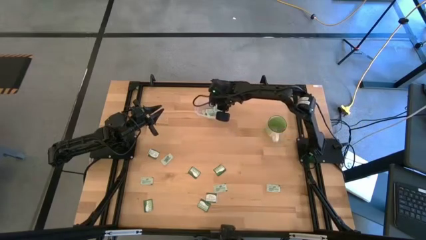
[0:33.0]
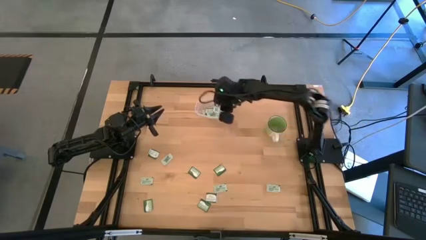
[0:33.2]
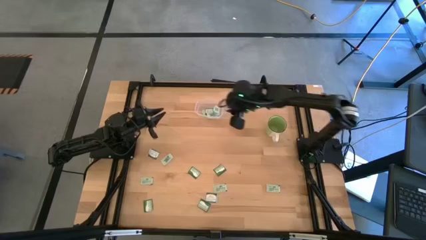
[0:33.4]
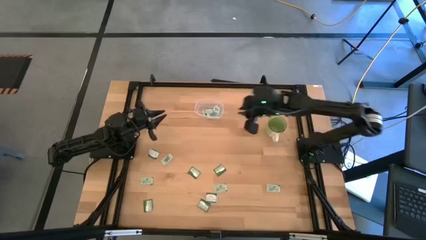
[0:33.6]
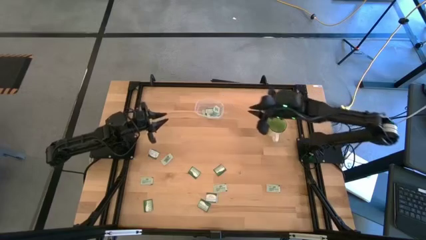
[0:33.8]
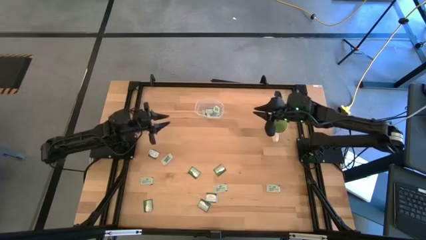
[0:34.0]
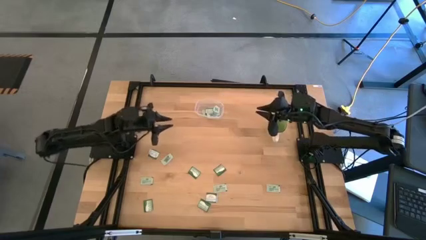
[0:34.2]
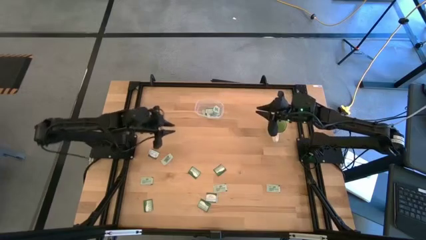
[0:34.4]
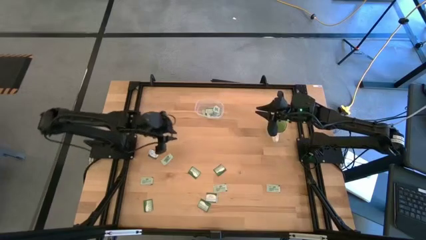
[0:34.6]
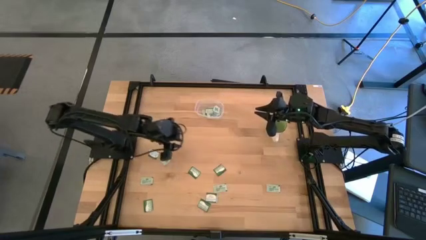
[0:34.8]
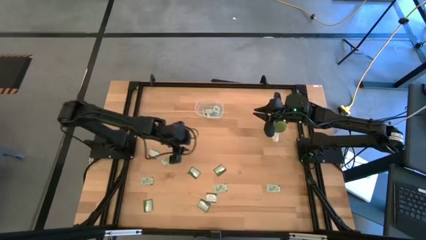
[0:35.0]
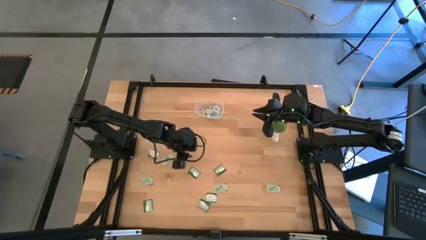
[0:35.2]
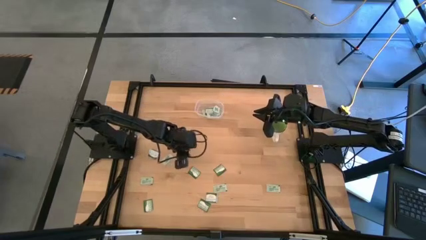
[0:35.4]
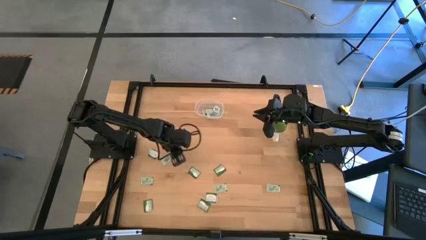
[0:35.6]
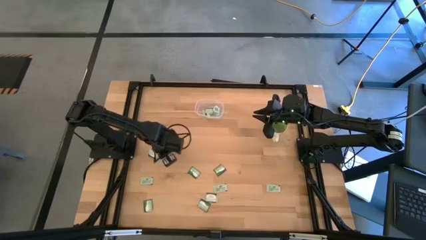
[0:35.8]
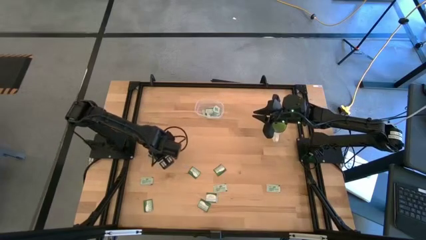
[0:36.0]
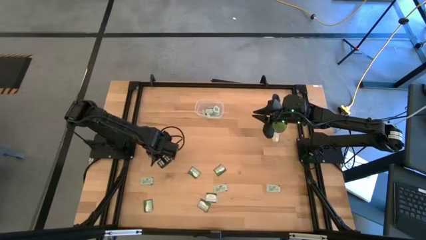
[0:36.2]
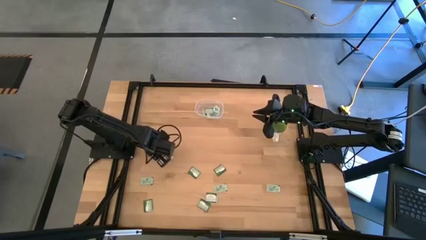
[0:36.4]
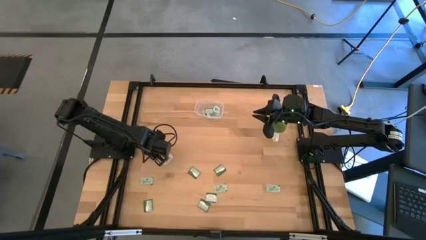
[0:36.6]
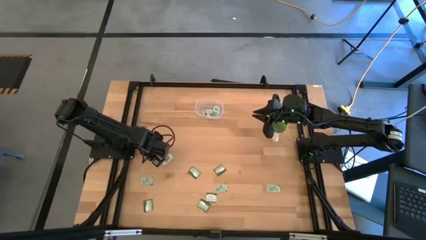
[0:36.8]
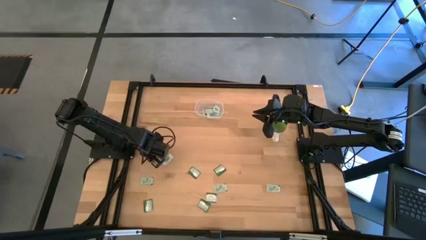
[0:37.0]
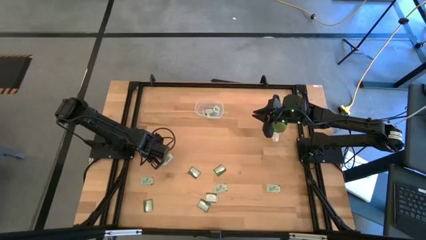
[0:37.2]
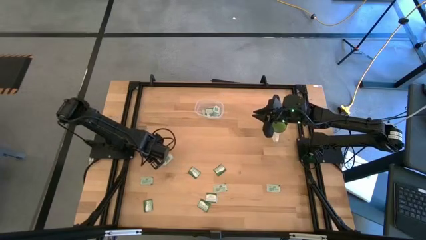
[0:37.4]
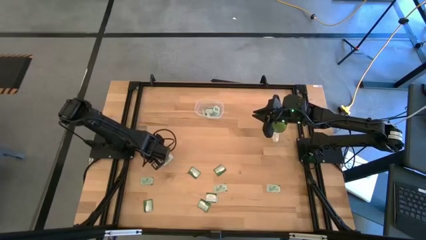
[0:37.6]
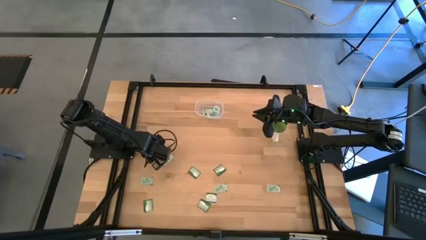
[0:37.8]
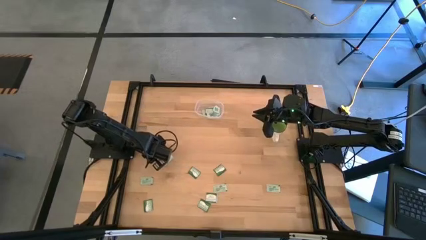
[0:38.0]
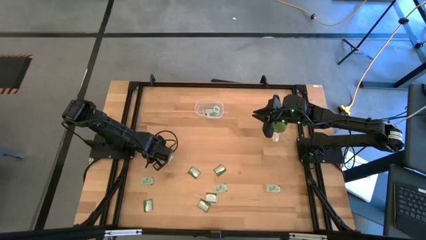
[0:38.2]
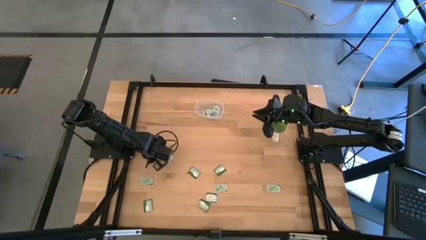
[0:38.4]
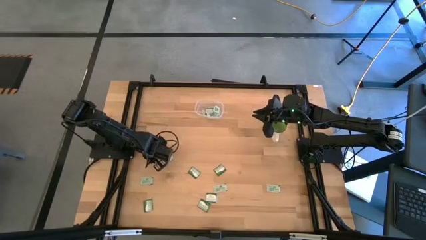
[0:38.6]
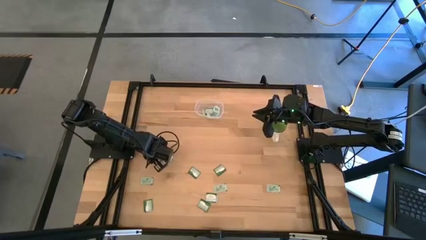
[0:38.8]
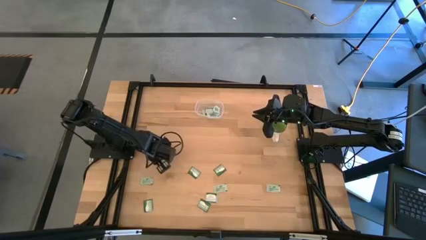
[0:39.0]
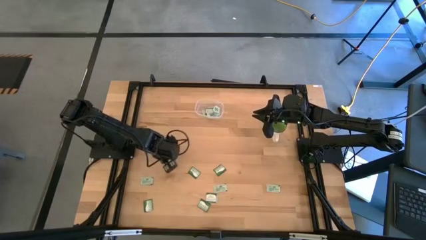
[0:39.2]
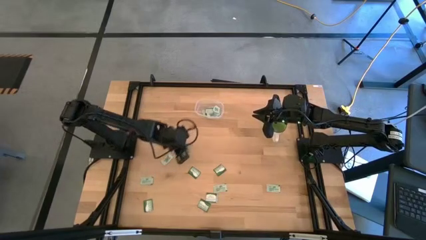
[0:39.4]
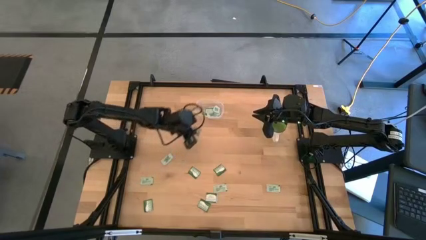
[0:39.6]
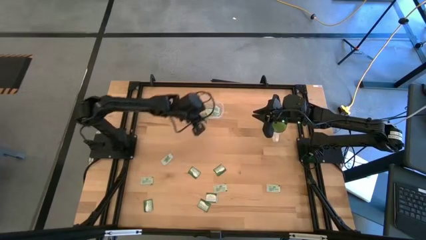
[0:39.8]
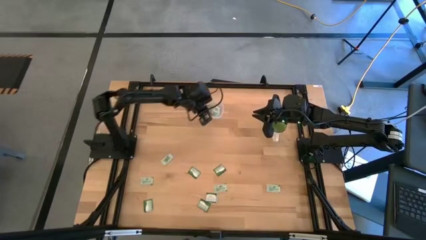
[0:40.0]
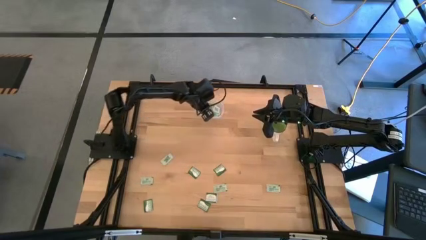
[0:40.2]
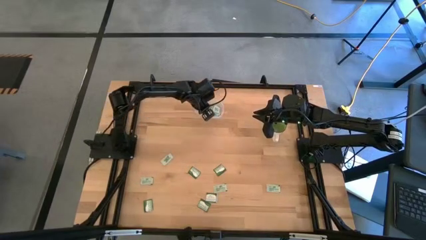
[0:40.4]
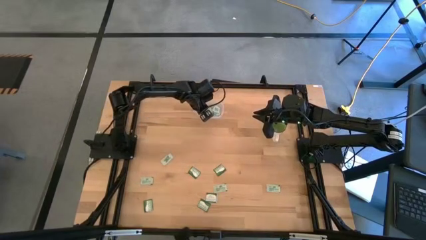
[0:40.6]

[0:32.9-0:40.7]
Task: Pick and place items into bin
Put the white stevia packet into the bin

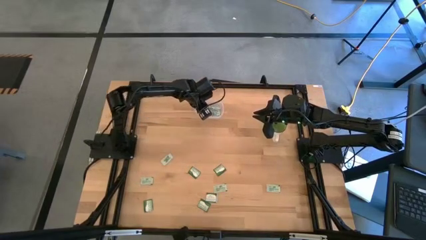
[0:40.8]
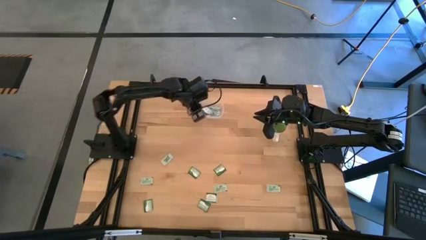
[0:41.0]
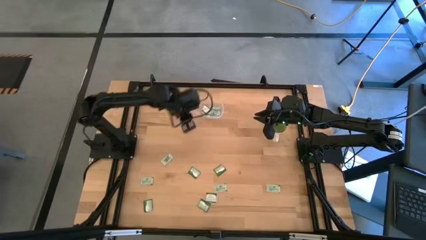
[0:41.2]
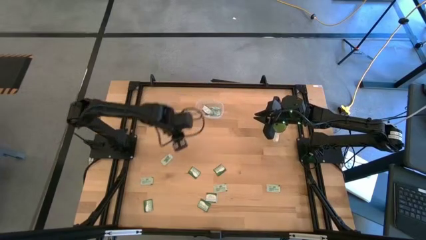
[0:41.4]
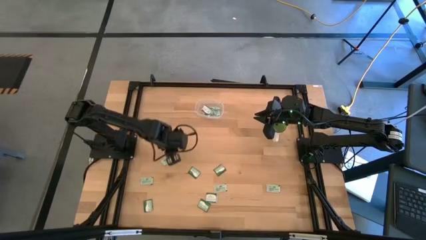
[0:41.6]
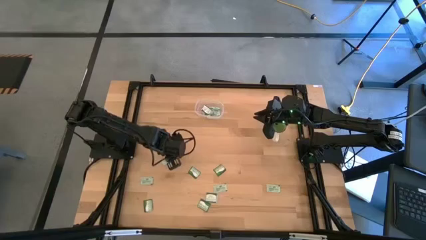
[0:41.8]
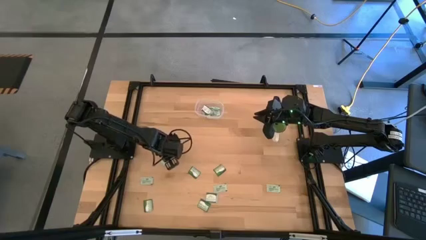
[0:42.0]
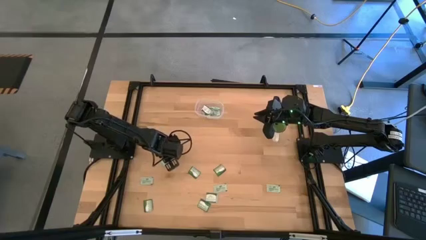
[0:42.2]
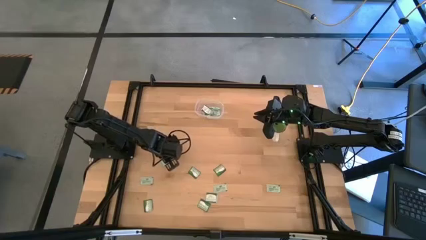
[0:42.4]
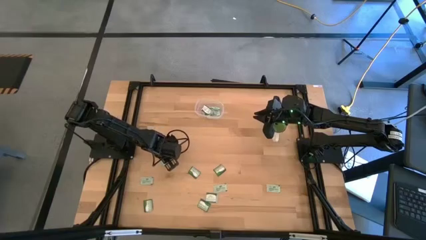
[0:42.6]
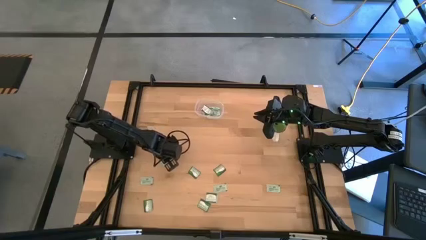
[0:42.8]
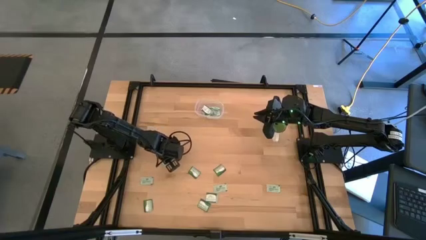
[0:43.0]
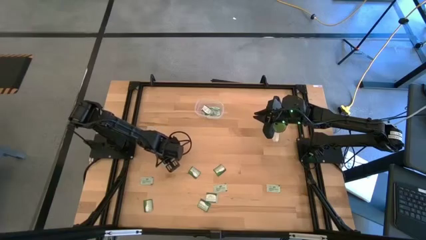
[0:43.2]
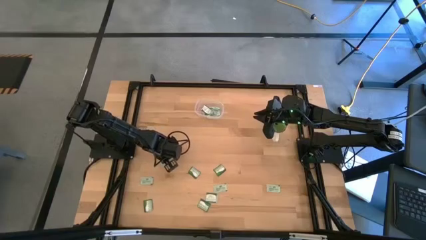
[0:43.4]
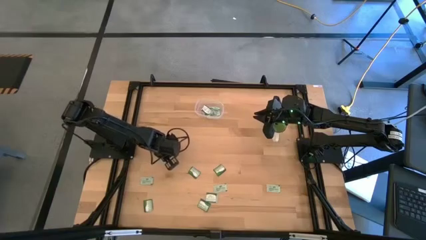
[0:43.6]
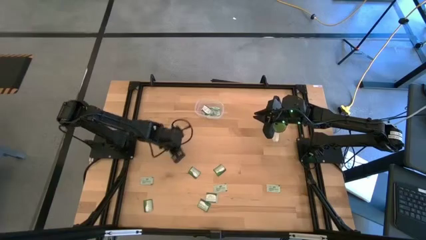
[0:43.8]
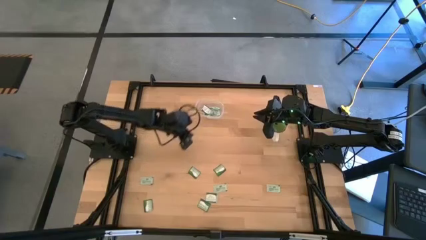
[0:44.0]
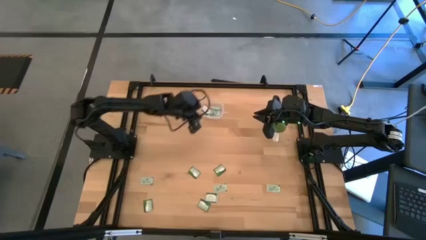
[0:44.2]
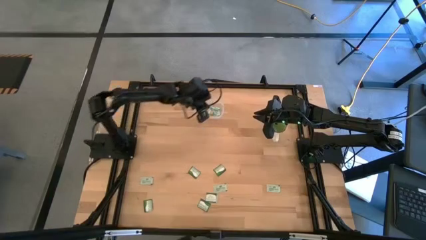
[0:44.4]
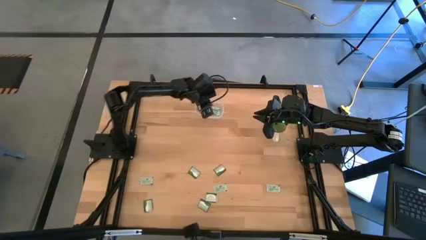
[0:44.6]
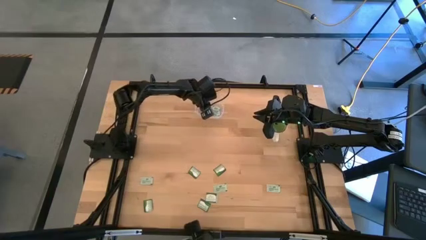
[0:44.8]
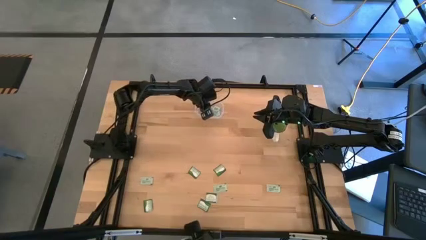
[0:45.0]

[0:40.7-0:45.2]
Put the green stevia packet into the bin

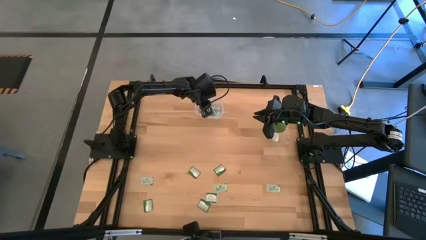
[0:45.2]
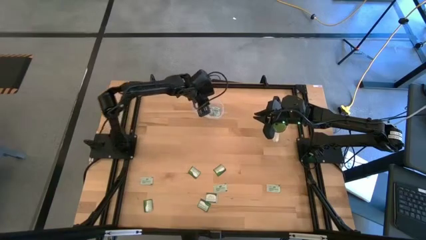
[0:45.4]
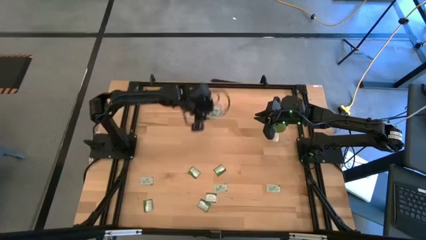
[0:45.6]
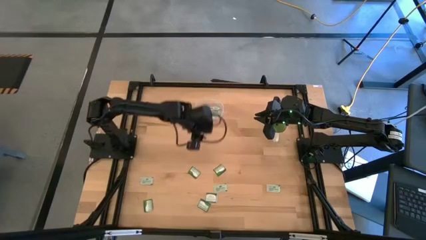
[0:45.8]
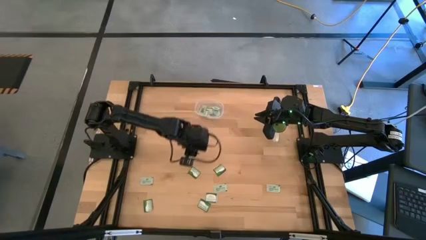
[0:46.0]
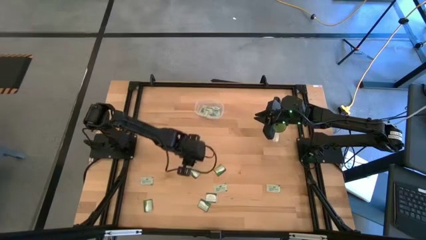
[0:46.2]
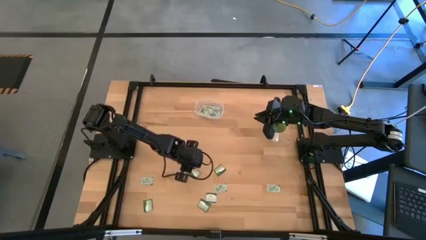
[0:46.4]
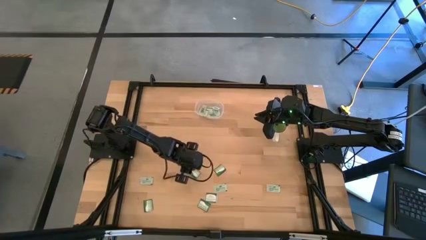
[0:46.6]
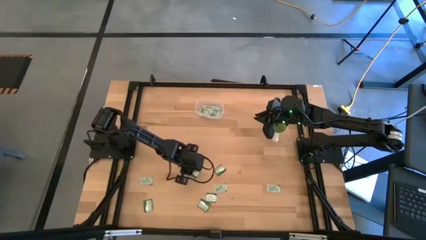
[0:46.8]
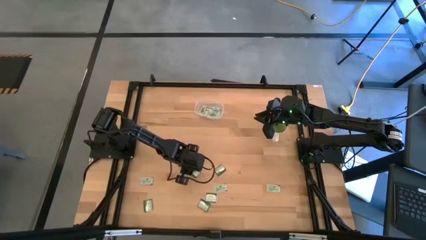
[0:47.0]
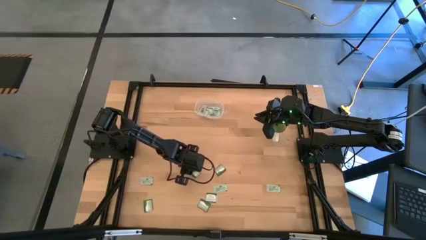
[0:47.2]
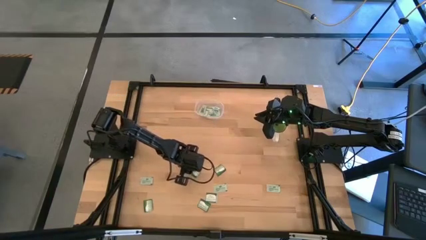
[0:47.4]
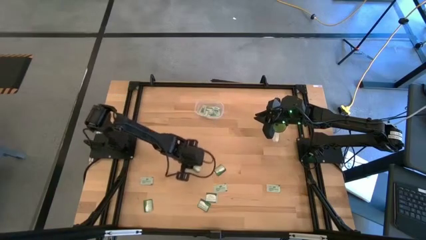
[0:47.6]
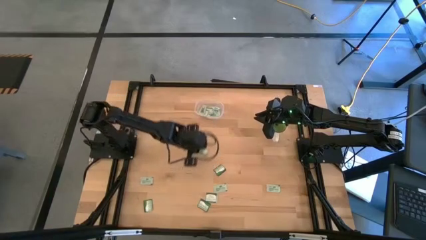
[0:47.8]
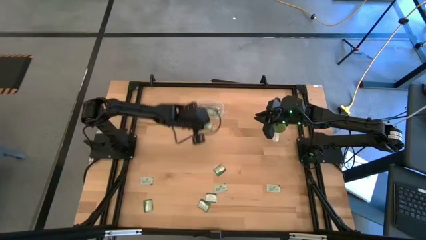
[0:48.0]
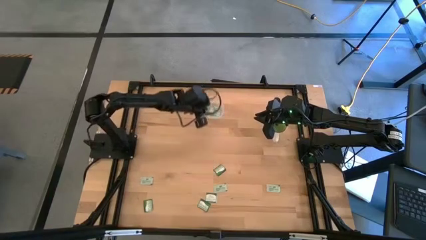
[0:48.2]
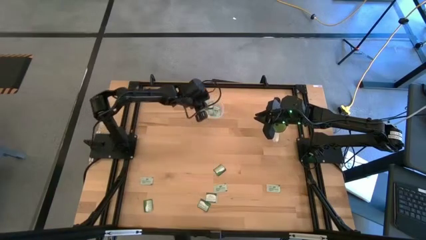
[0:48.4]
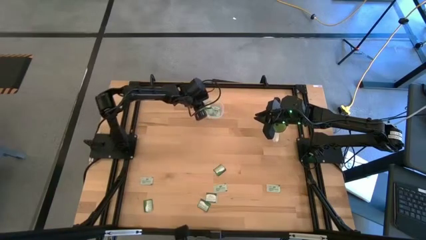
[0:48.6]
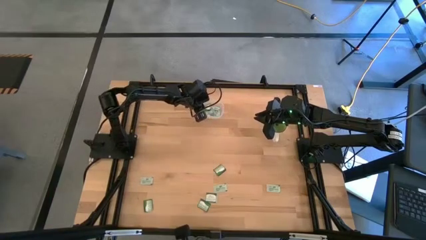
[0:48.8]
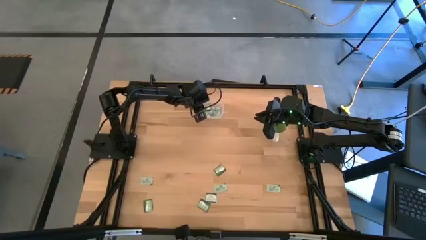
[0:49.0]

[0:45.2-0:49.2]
Put the white stevia packet into the bin
